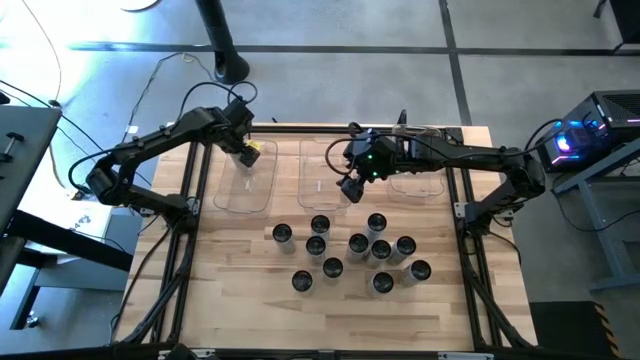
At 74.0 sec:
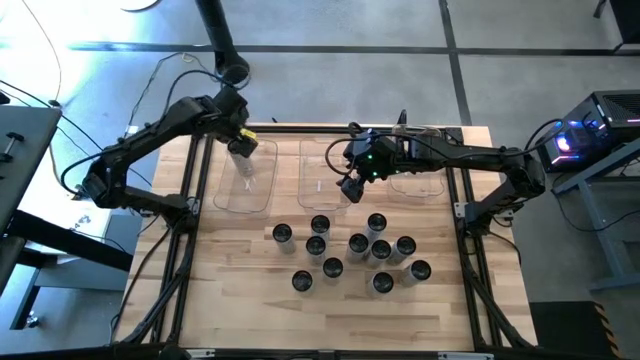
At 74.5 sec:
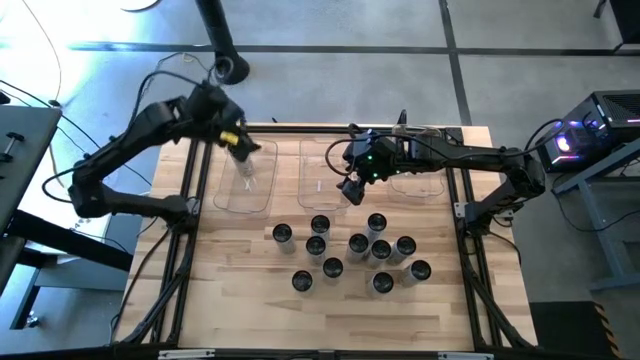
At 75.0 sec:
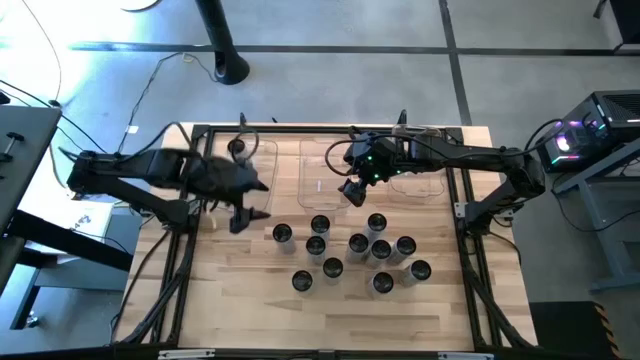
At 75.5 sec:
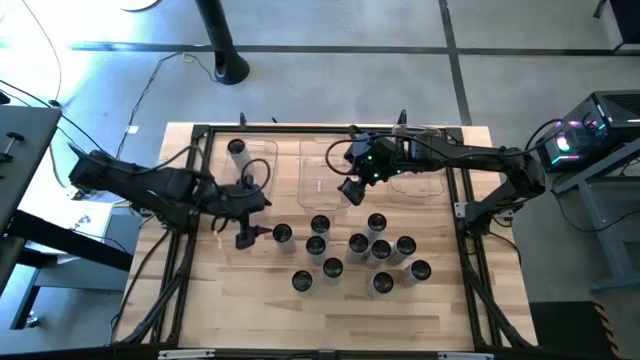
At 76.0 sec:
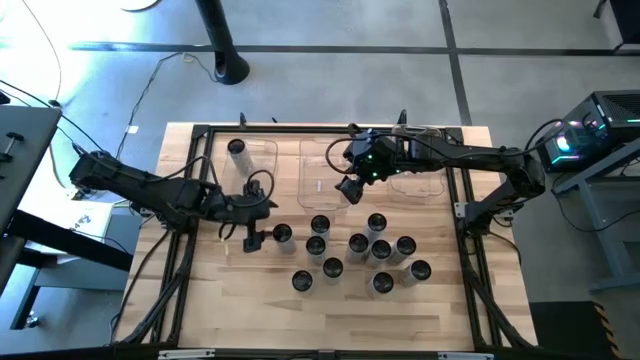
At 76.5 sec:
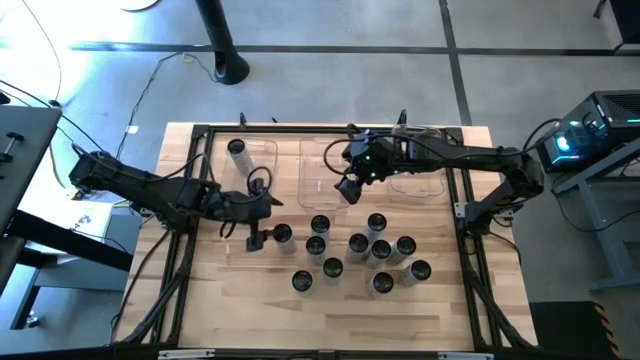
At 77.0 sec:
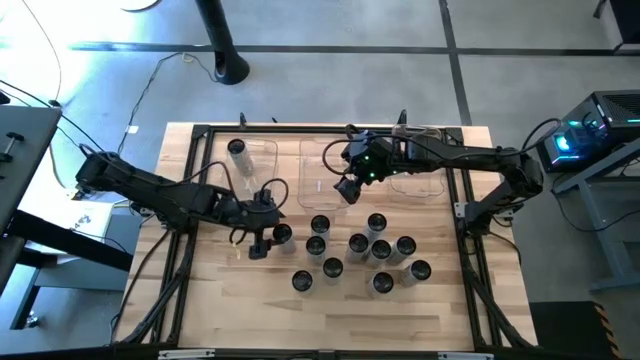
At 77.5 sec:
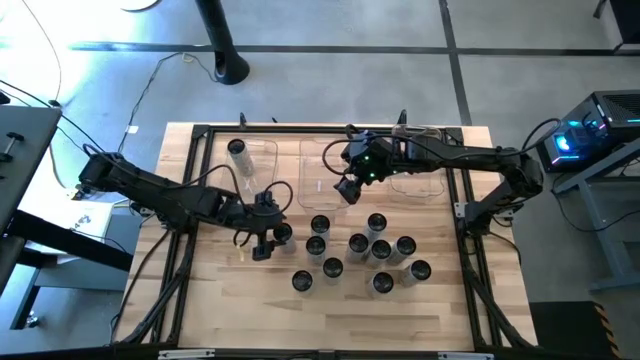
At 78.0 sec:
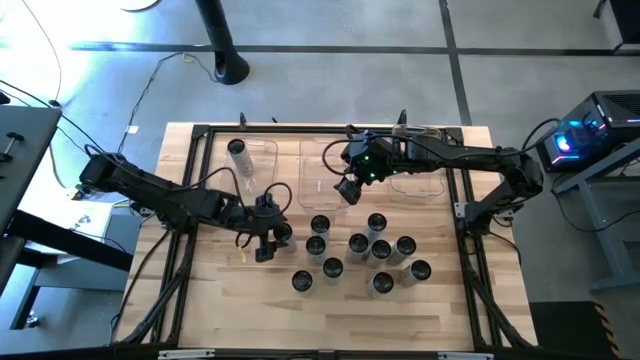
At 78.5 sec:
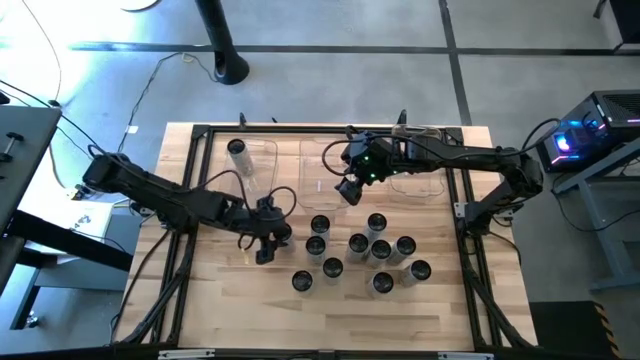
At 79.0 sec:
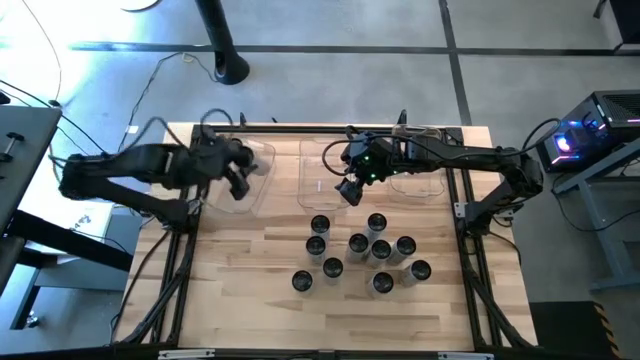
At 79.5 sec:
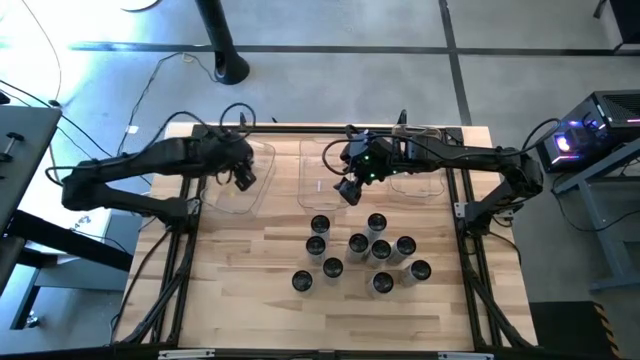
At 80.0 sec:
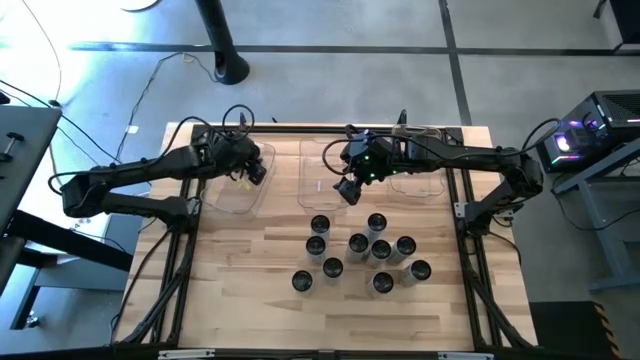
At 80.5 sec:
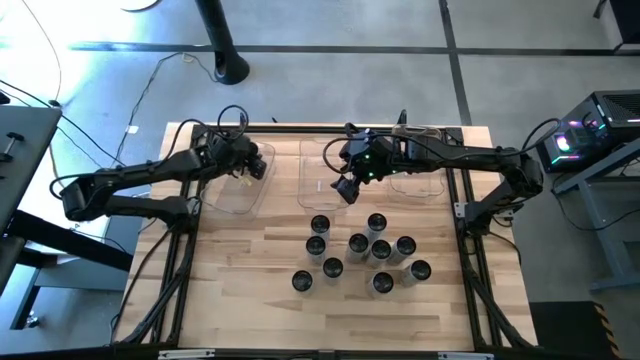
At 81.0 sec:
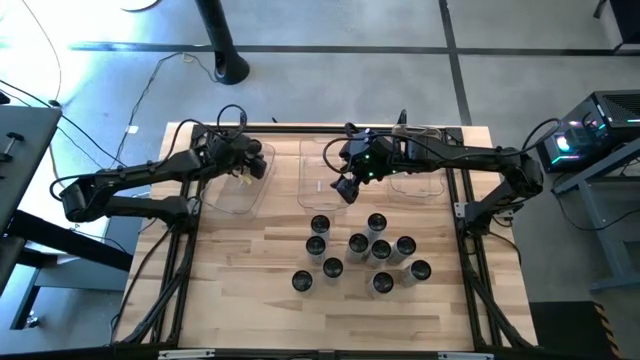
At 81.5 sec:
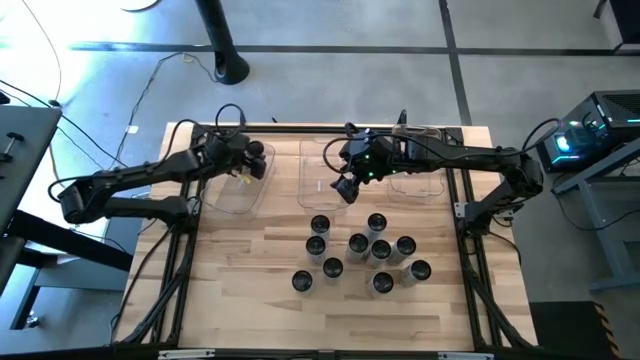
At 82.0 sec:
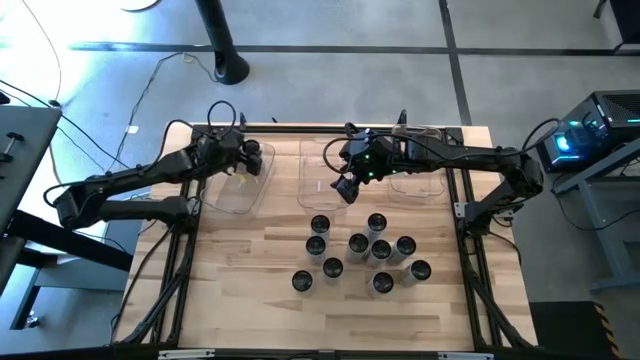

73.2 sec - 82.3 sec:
Task: Sort soda cans
Put the white-yellow soda can into the top left transparent bin

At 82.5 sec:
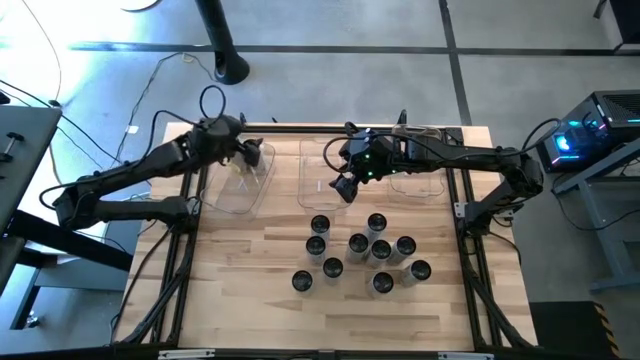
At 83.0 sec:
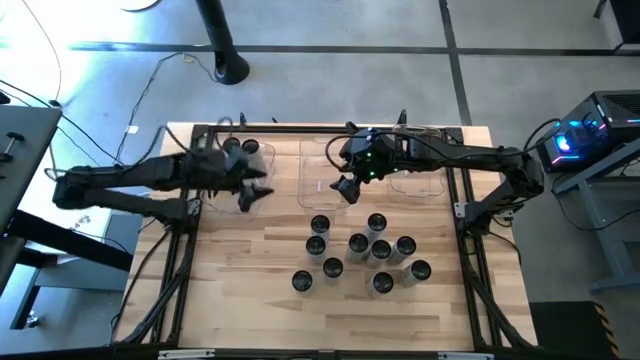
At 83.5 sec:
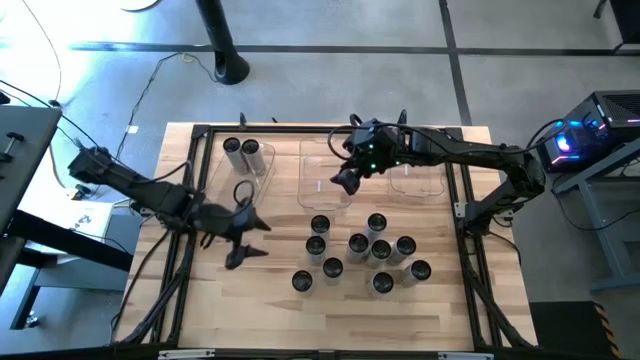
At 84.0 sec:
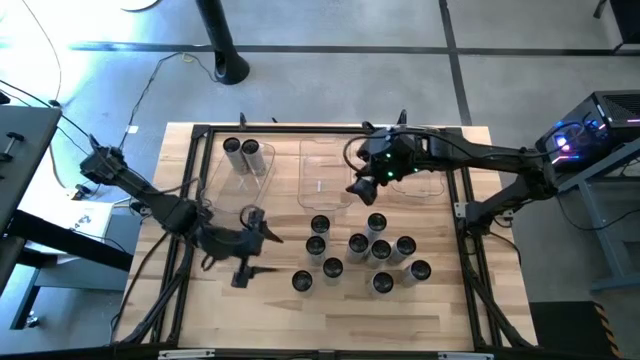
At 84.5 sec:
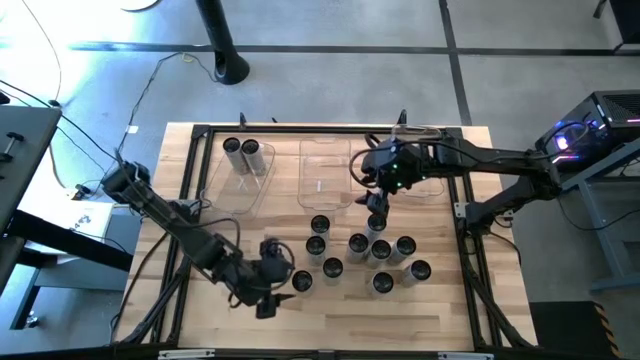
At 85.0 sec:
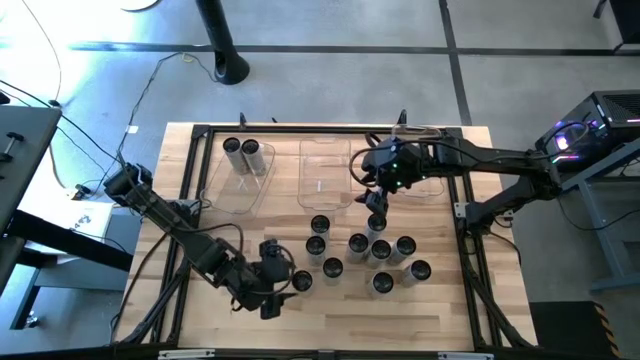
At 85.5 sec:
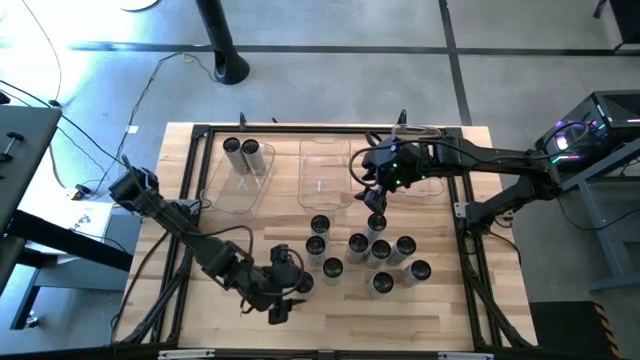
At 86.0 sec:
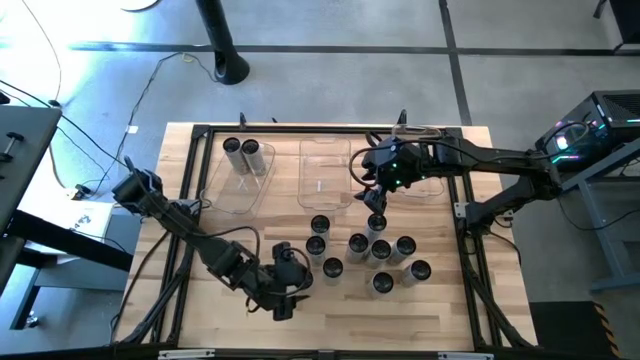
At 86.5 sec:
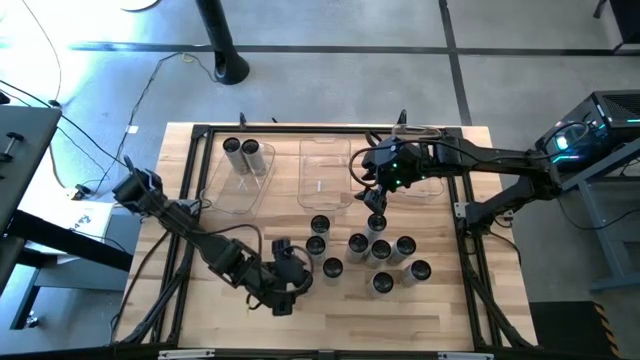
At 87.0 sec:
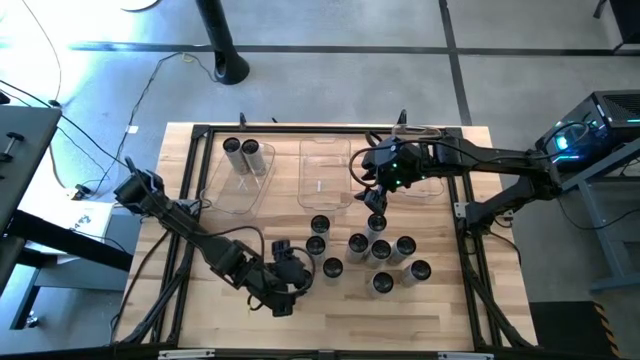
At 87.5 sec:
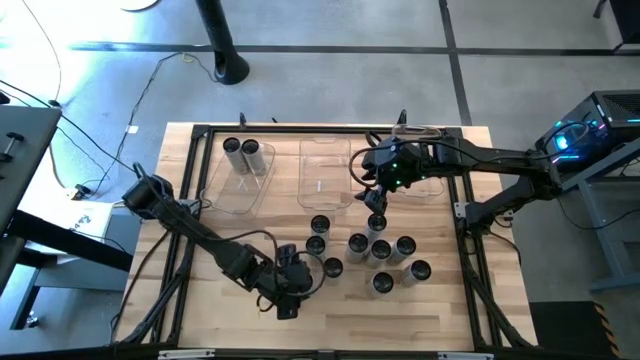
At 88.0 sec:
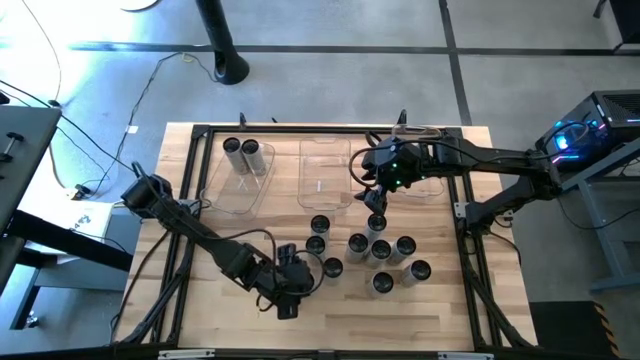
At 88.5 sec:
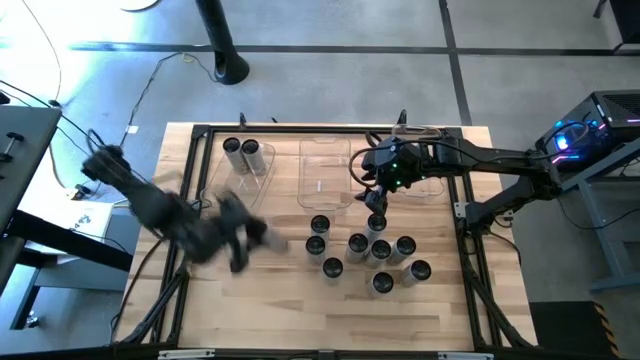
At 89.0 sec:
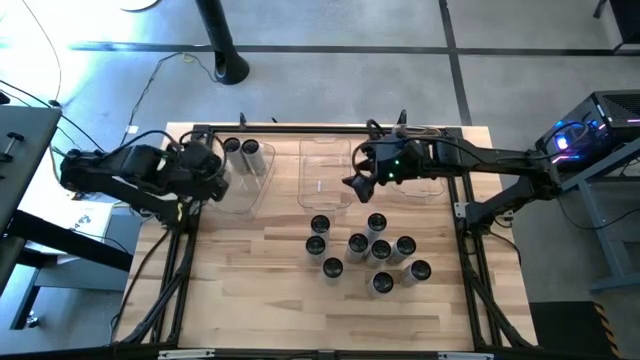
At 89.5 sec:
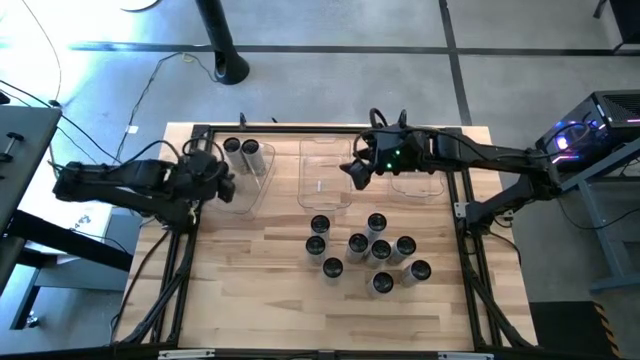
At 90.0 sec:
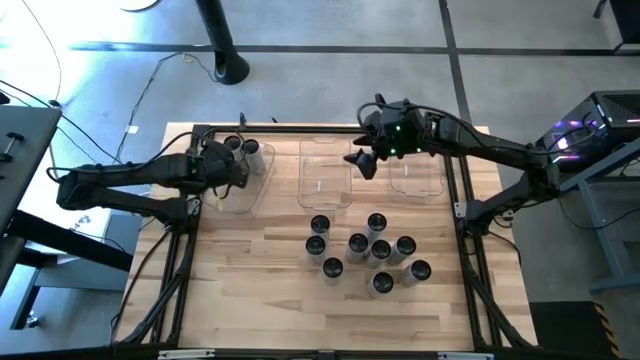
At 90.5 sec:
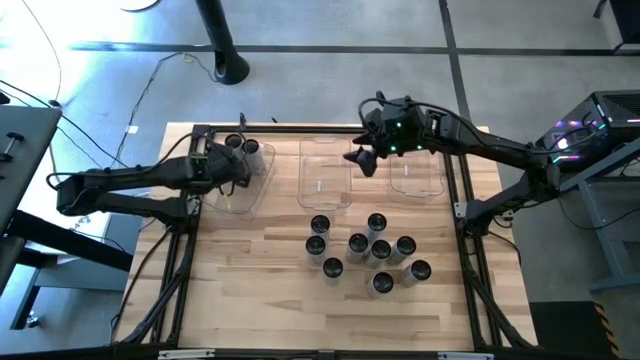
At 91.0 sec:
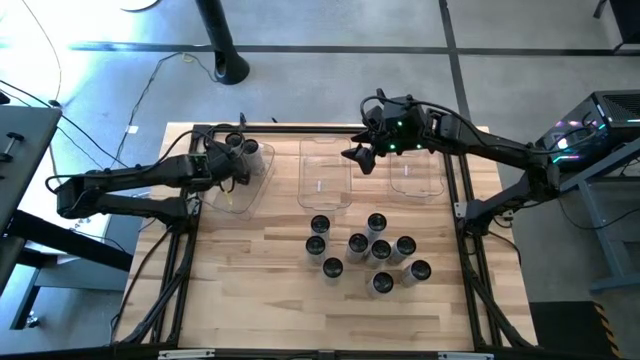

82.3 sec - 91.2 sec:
Put the white-yellow soda can into the top left transparent bin

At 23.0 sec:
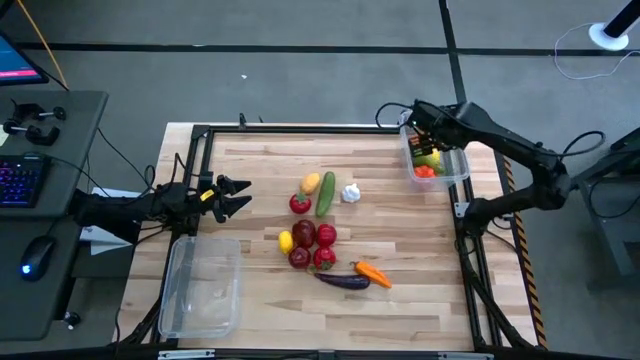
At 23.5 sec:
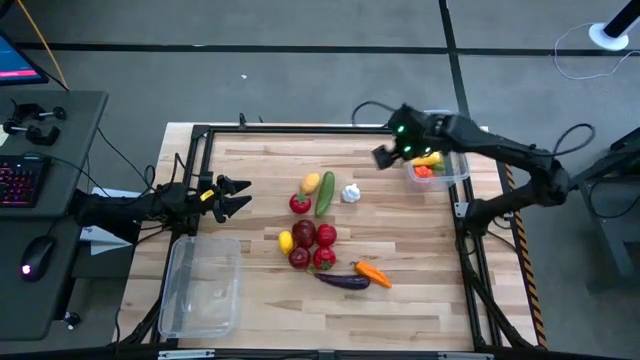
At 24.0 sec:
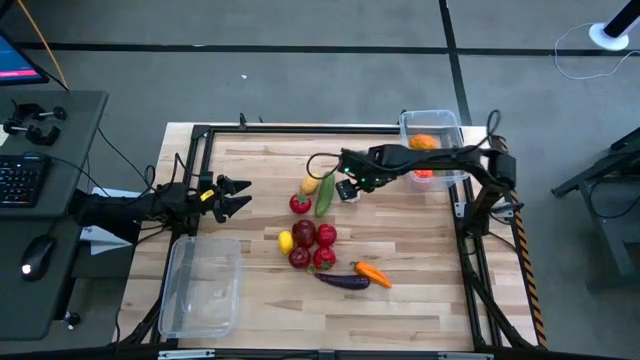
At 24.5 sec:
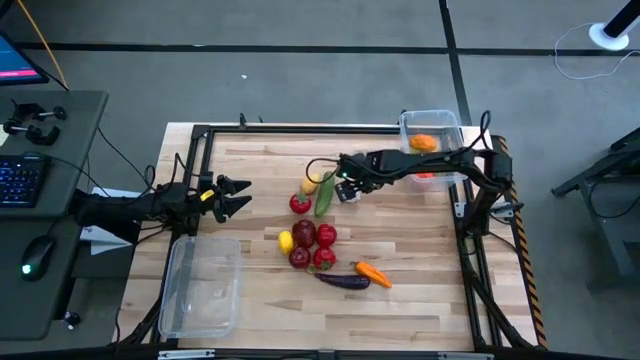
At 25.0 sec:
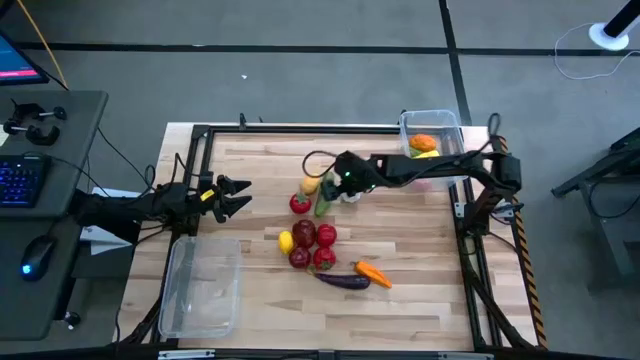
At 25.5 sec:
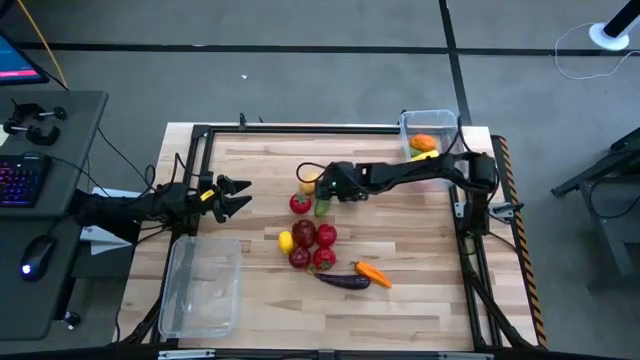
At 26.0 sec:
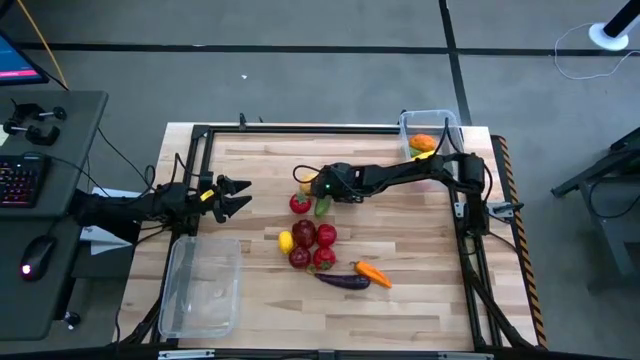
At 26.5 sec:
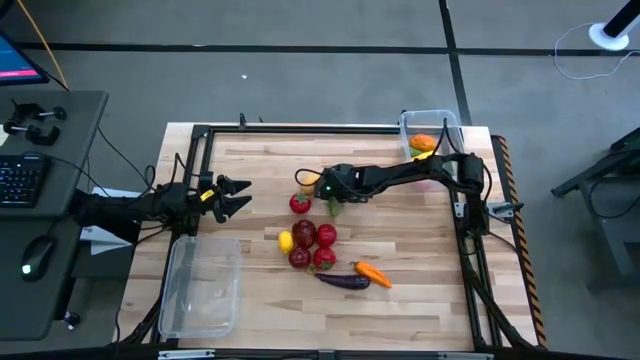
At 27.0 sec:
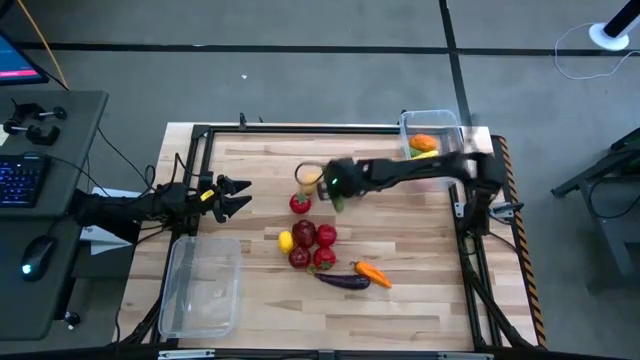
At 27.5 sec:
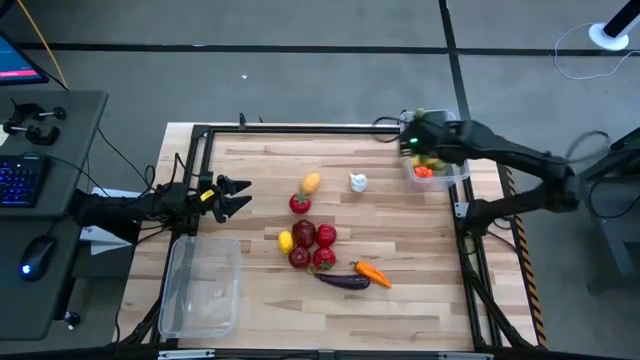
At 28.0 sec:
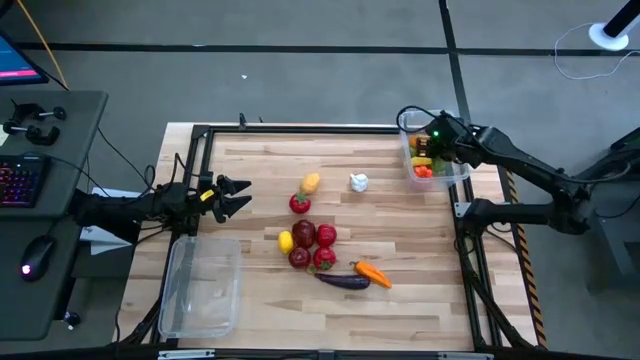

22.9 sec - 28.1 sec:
Task: Sort produce into baskets
Put the green cucumber into the top transparent bin
